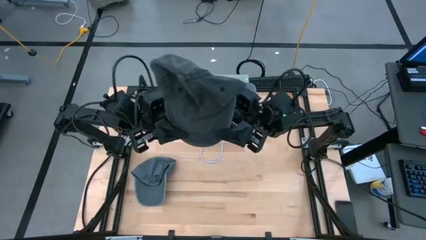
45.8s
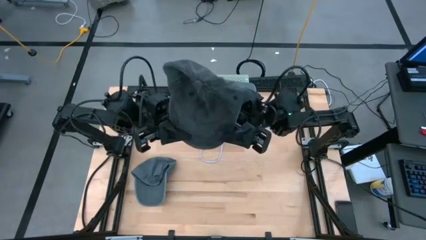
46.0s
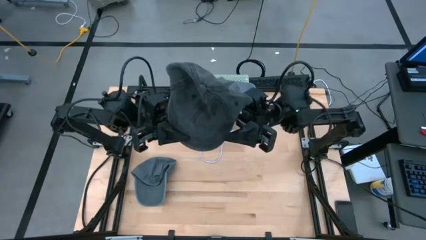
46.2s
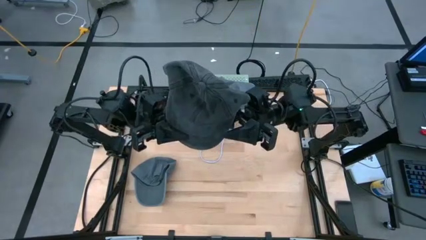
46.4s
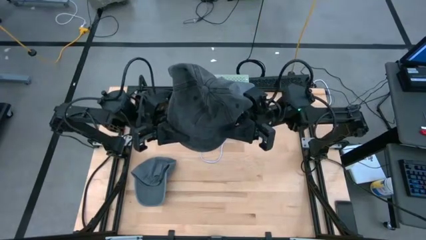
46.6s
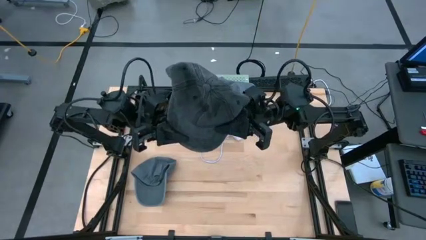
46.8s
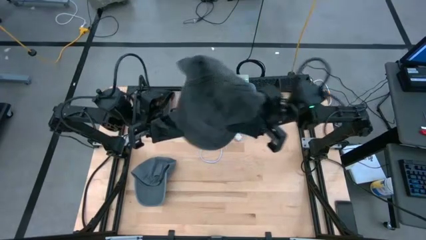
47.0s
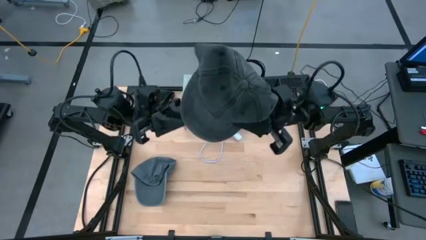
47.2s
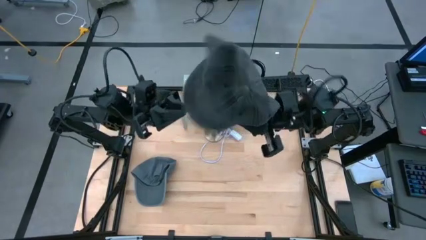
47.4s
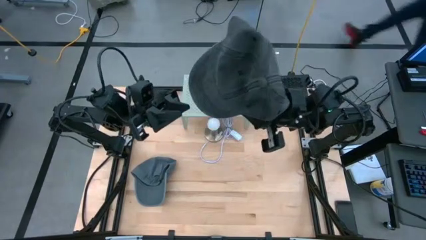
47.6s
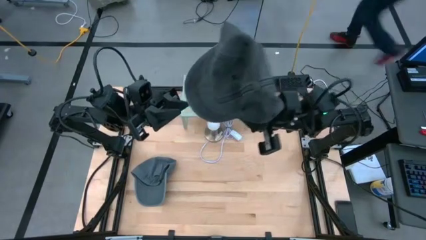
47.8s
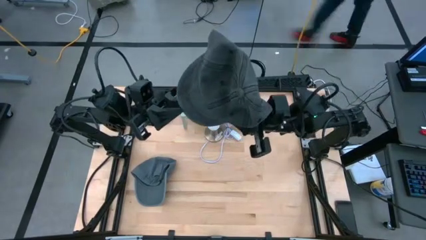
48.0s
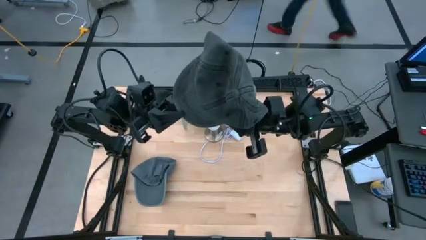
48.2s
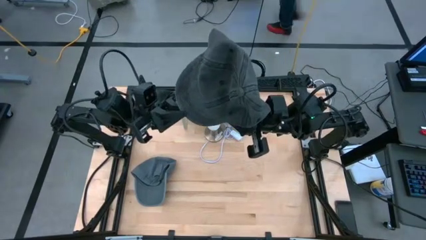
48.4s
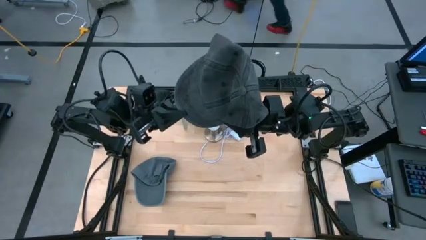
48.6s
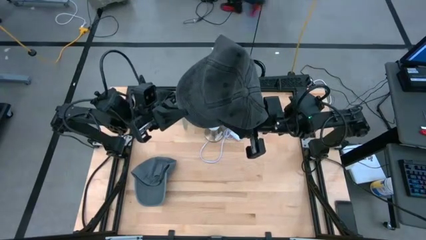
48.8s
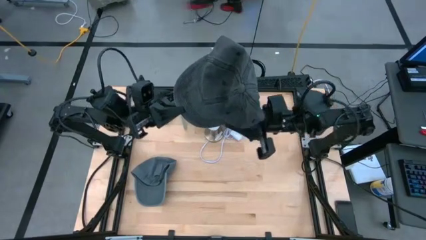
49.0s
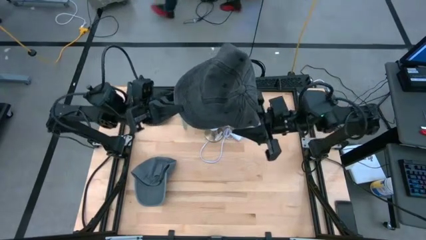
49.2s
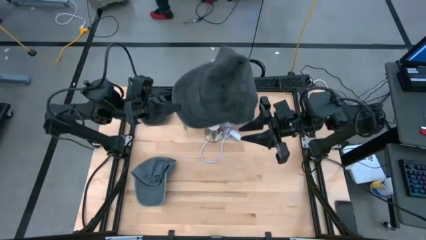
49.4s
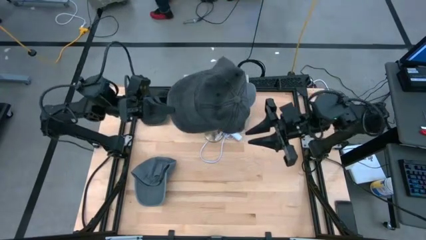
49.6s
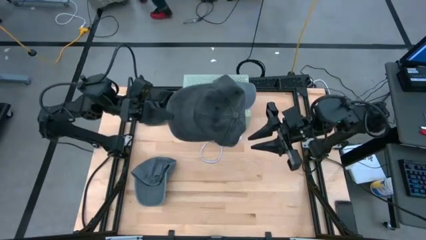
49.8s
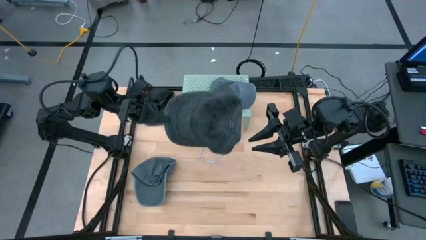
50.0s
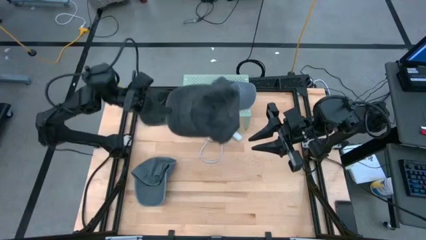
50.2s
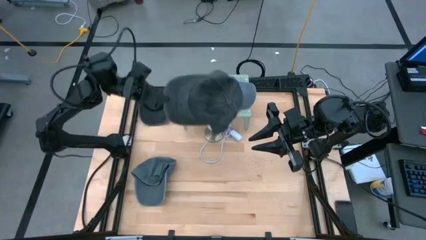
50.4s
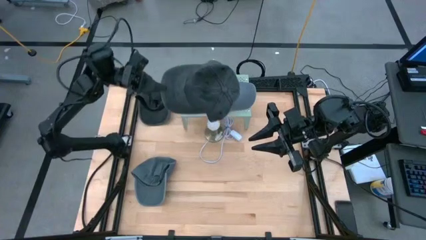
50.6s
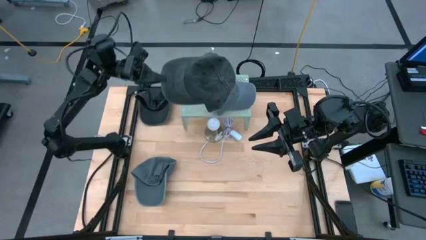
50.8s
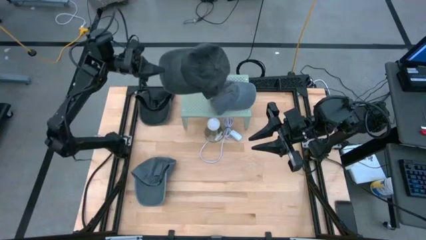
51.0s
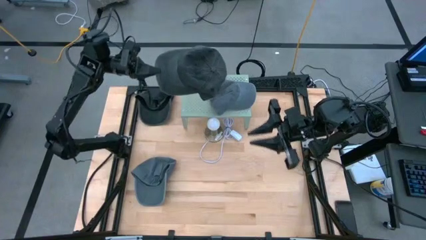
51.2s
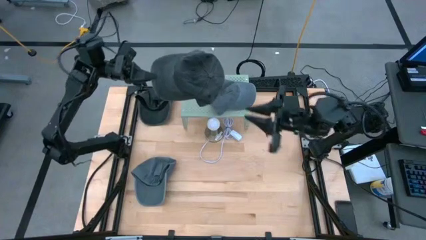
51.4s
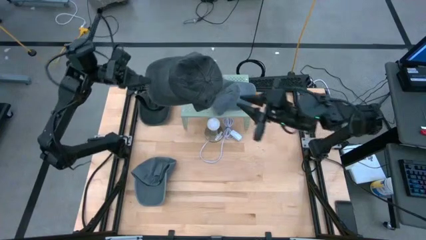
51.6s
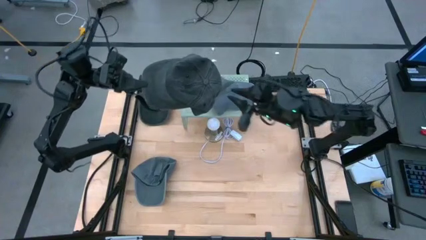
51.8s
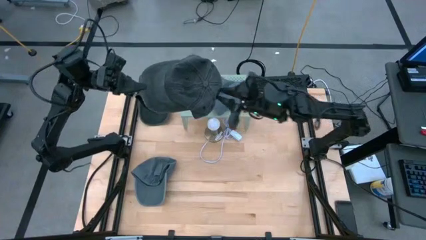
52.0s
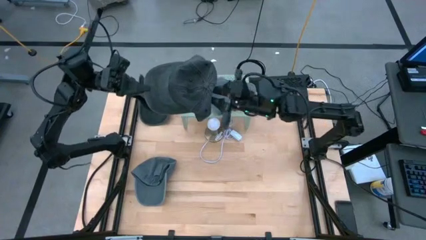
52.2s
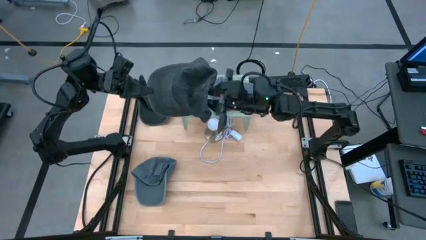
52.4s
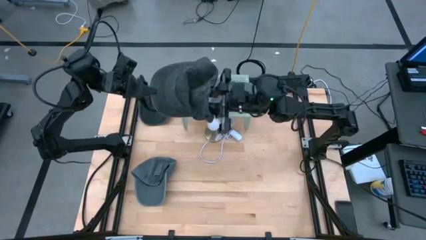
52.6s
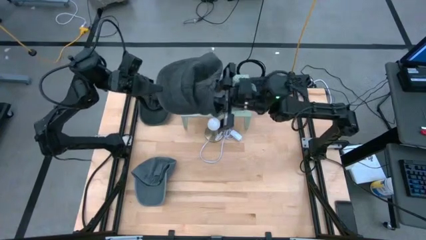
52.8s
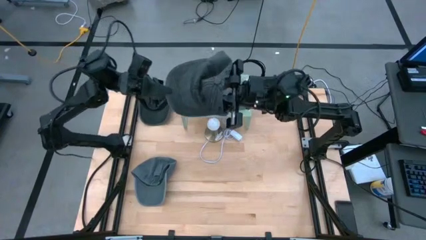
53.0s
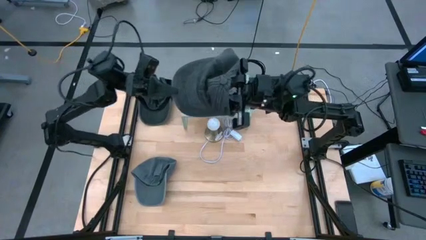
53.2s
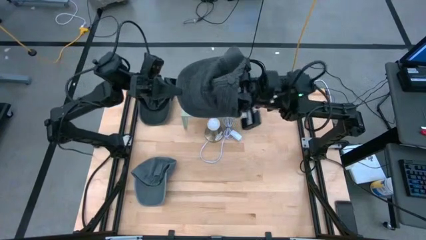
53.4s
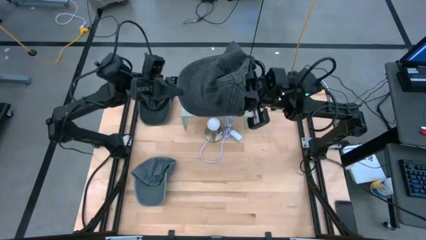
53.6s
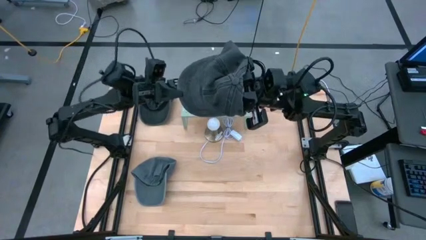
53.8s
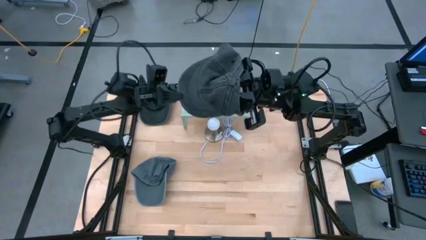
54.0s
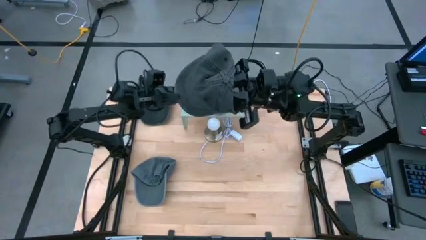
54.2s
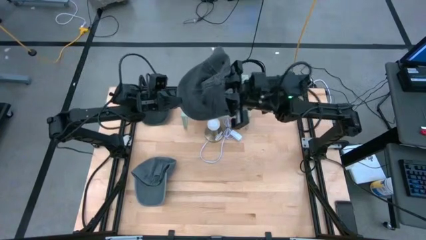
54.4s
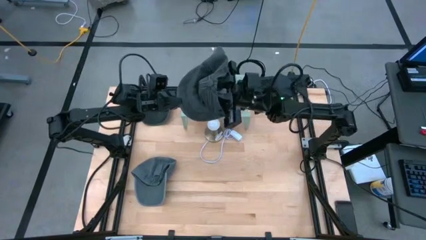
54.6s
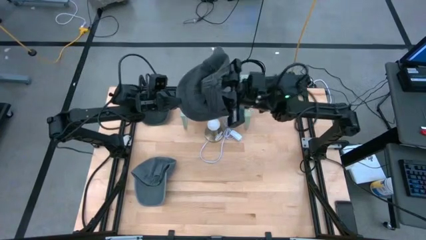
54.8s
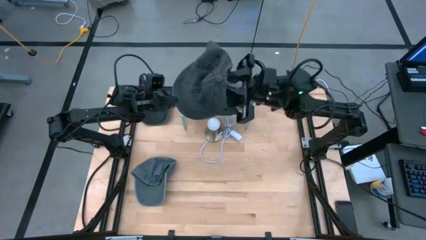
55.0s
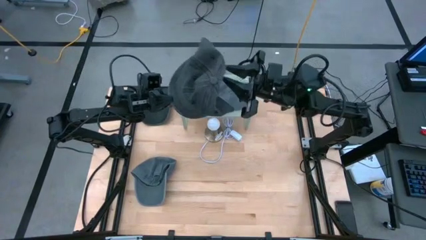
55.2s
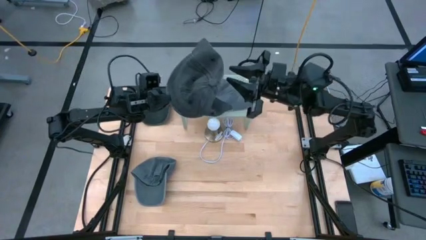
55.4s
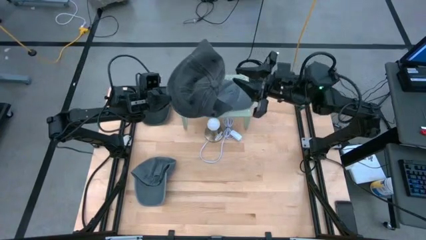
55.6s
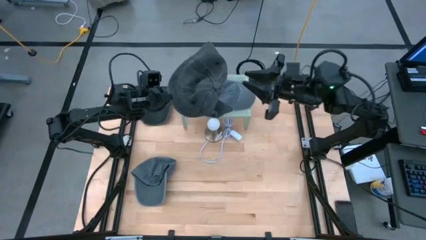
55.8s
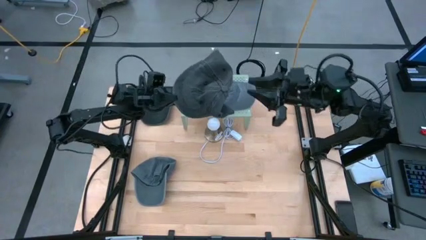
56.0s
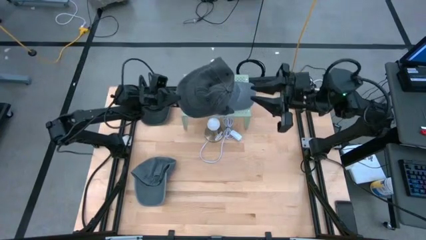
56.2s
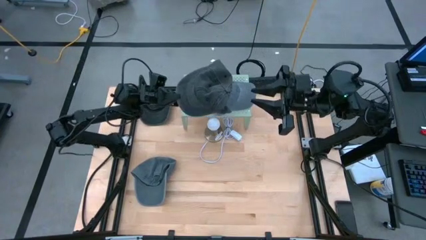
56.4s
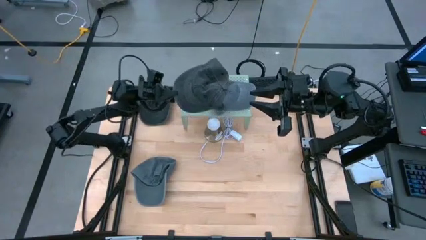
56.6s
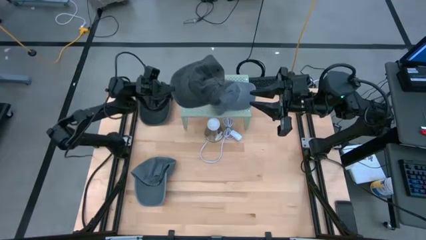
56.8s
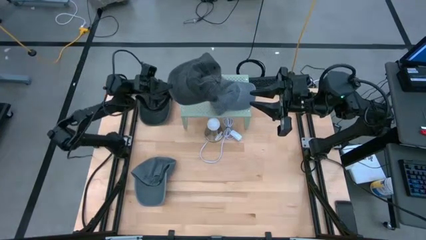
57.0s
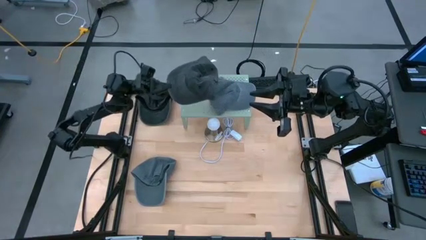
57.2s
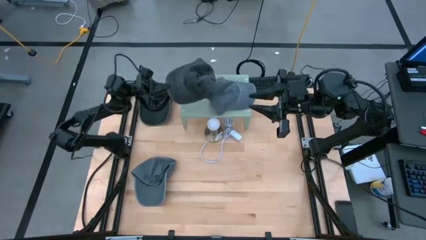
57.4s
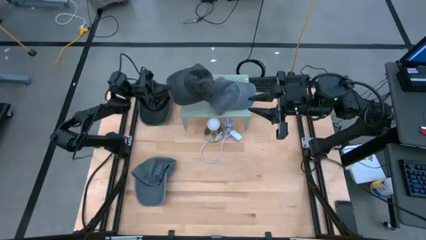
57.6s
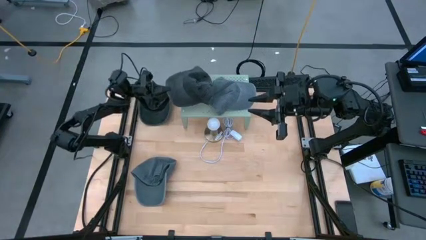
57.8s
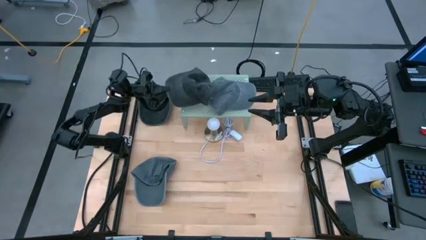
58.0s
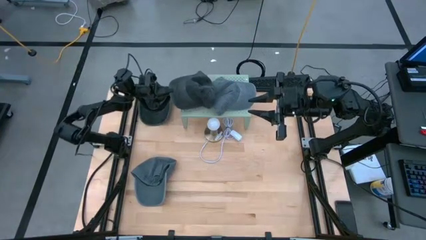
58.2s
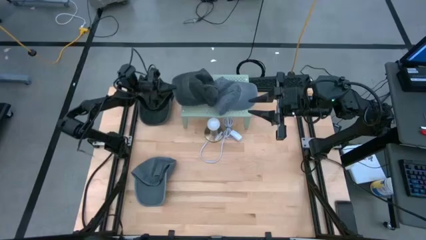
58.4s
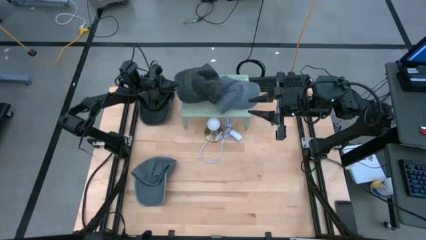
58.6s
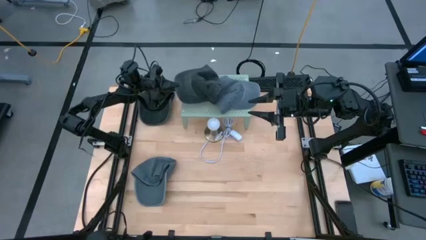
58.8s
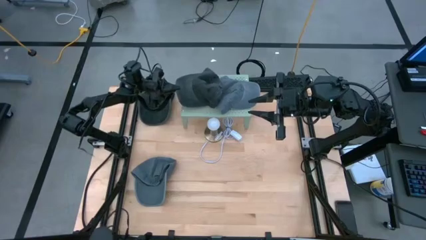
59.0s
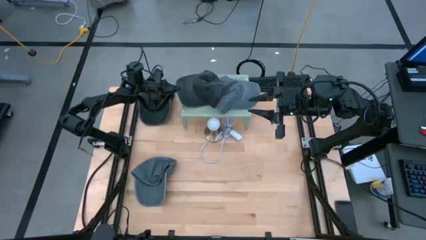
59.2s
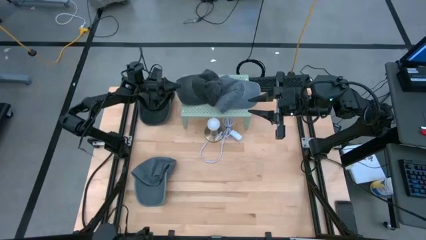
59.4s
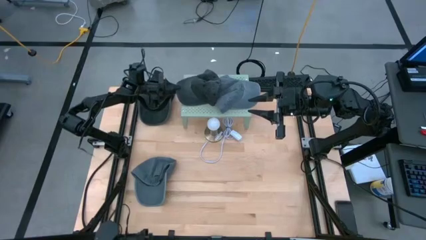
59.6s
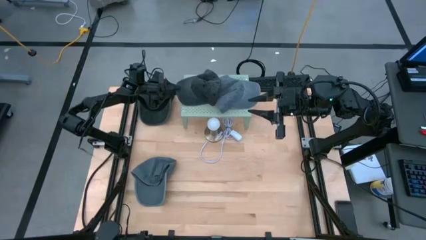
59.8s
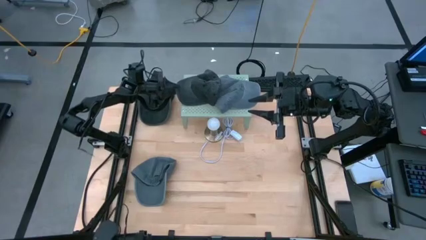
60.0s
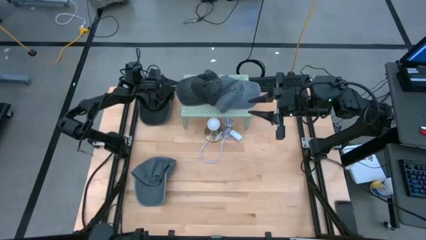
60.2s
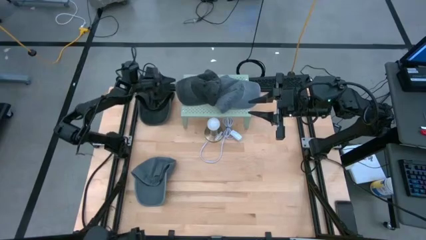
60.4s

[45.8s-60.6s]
Task: Pick & Place hat
Put the right black cap on the shelf

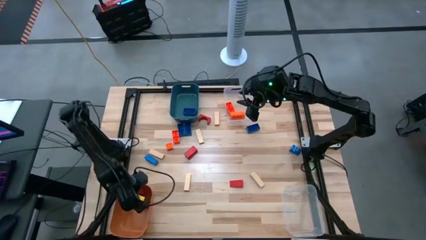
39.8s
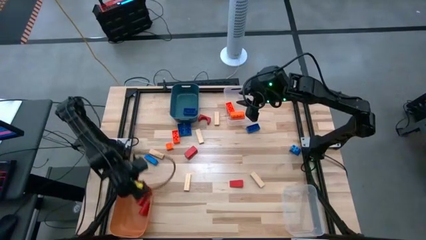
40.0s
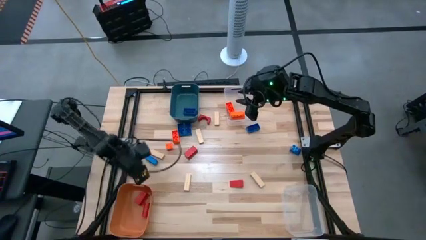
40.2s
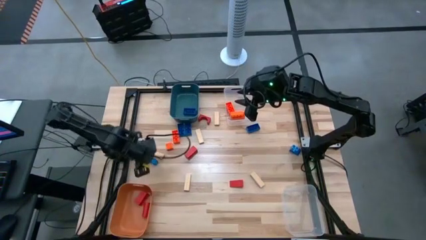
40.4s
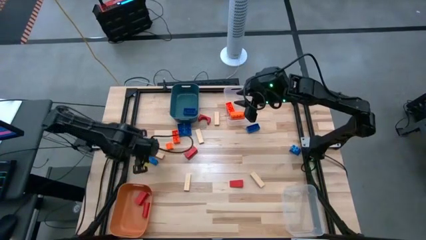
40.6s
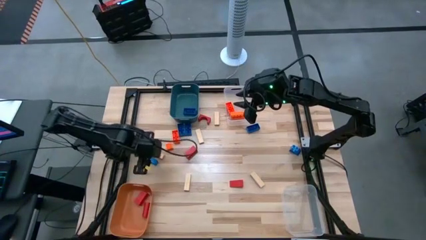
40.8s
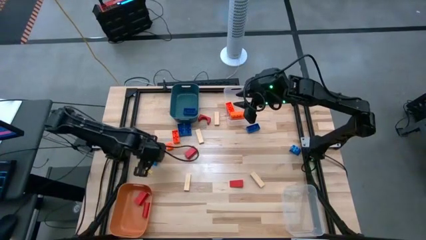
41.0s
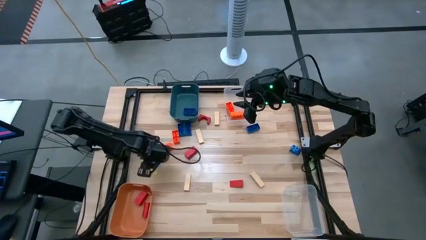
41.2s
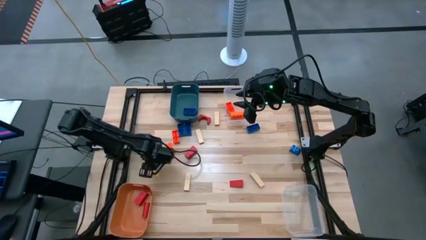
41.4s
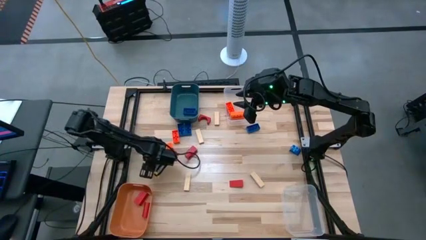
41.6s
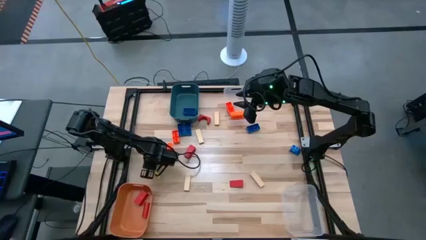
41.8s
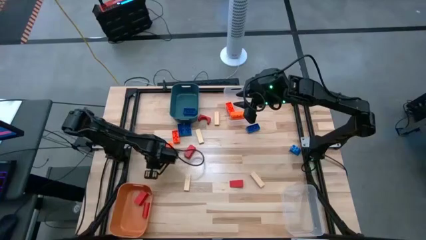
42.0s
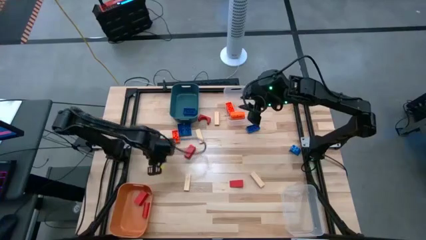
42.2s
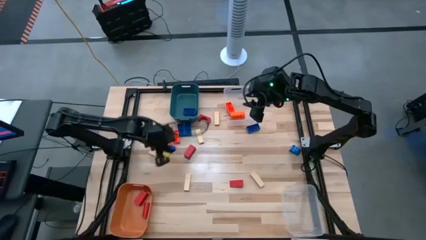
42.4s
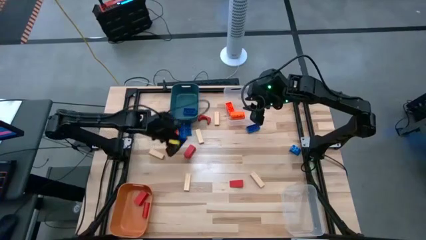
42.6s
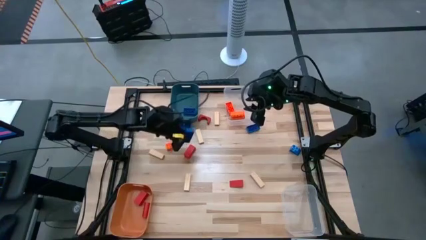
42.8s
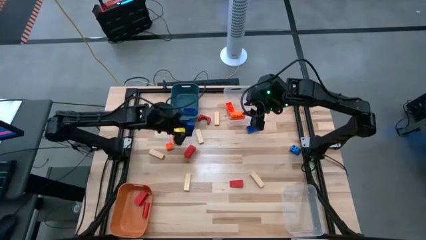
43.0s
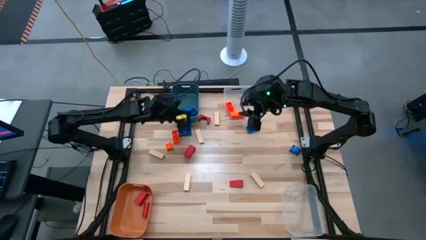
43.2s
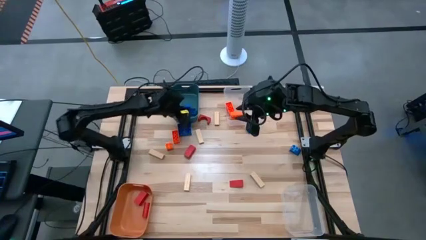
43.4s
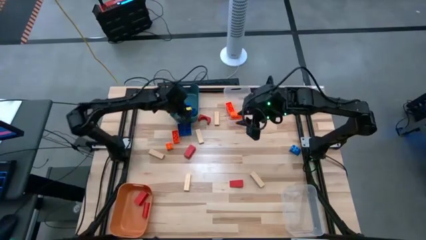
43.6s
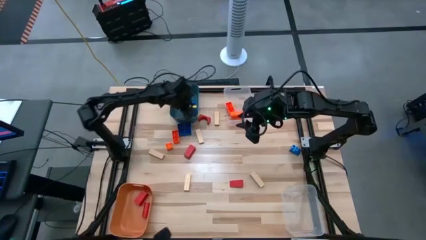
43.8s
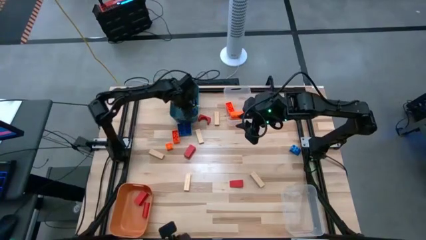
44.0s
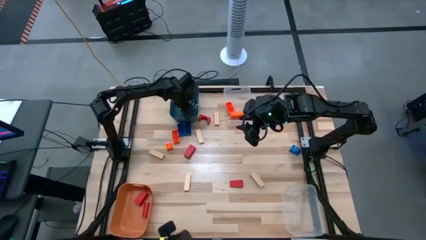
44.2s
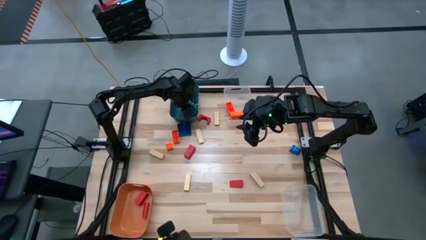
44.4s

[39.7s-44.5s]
Task: Sort blocks
Put the blue game piece into the dark blue bin
